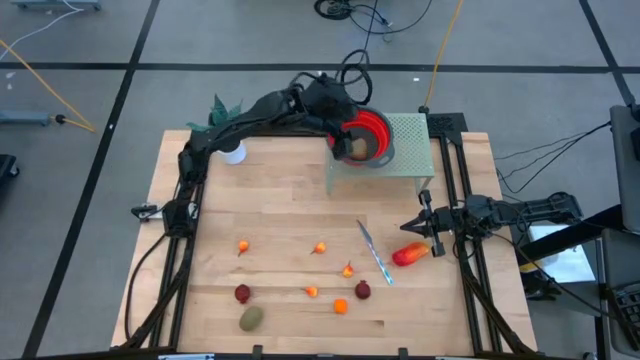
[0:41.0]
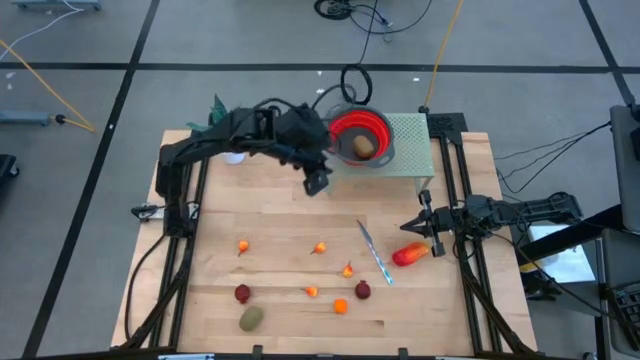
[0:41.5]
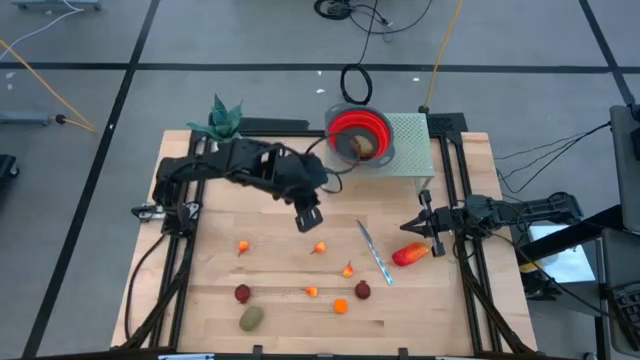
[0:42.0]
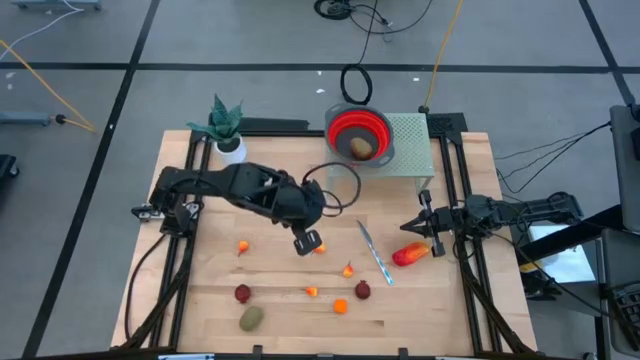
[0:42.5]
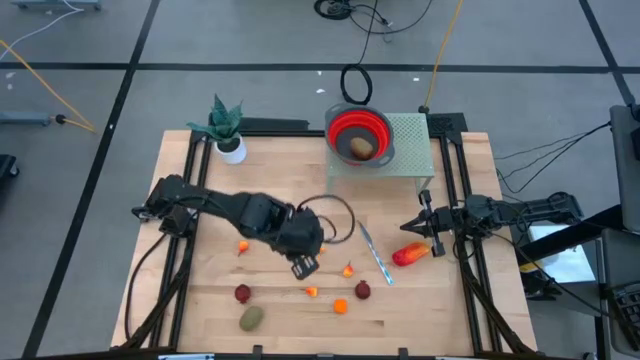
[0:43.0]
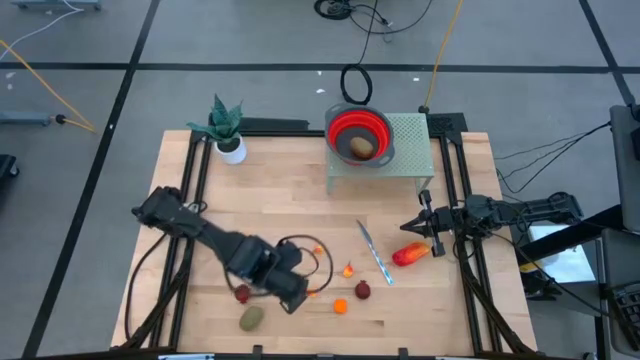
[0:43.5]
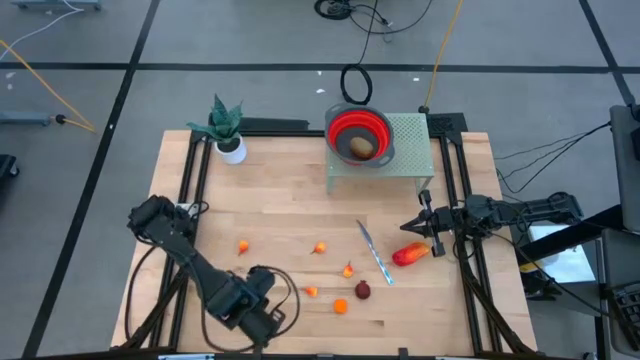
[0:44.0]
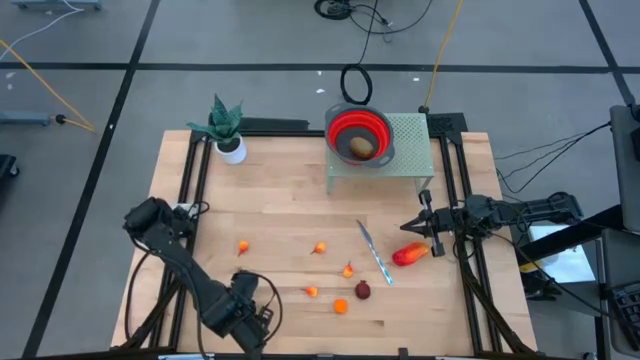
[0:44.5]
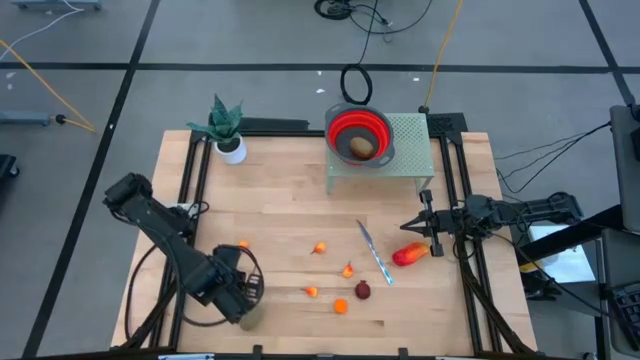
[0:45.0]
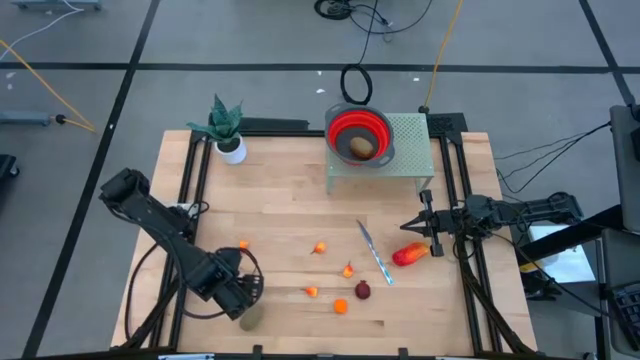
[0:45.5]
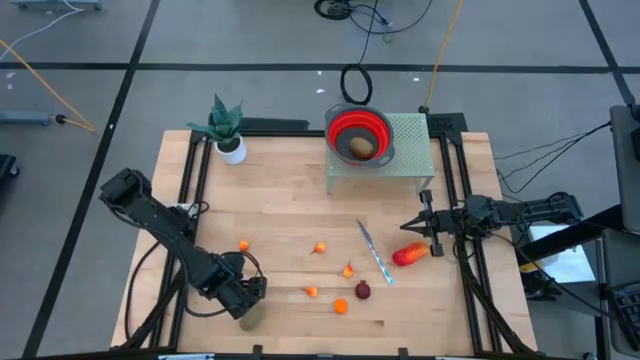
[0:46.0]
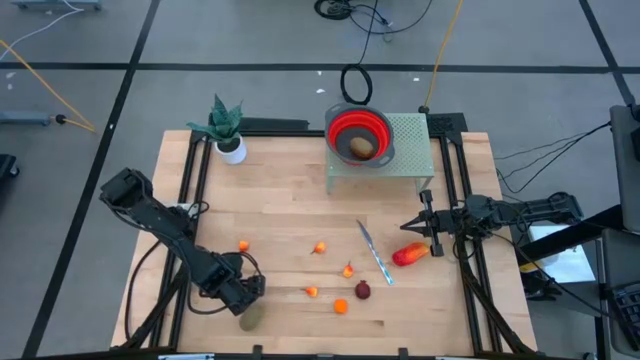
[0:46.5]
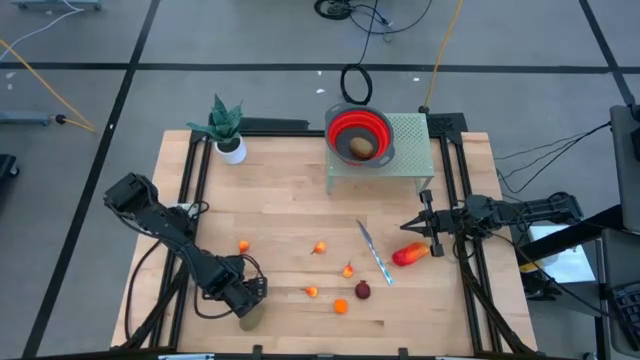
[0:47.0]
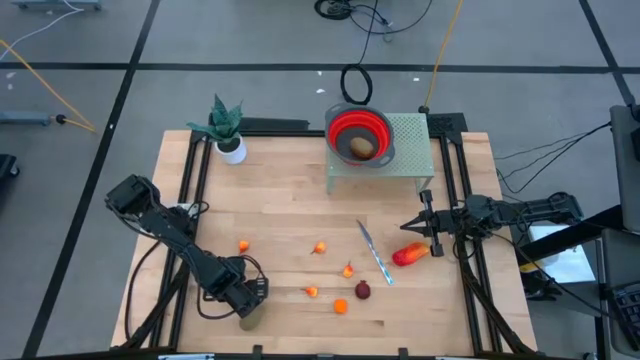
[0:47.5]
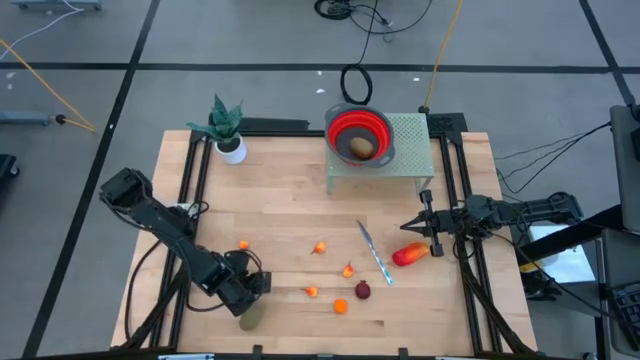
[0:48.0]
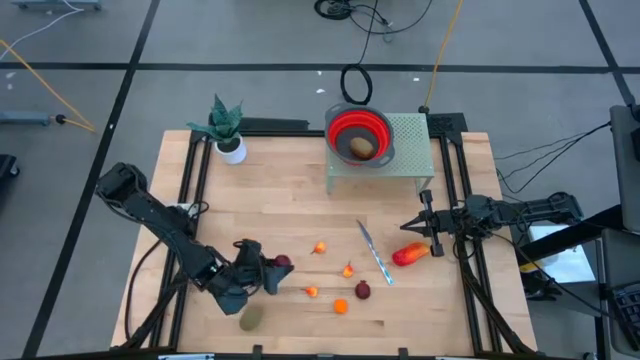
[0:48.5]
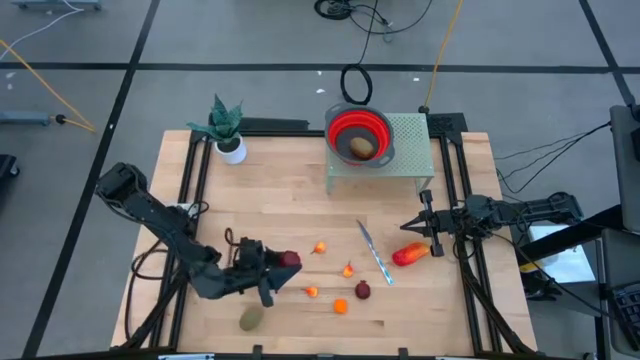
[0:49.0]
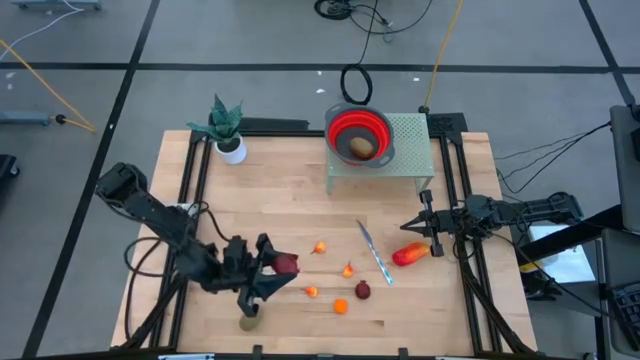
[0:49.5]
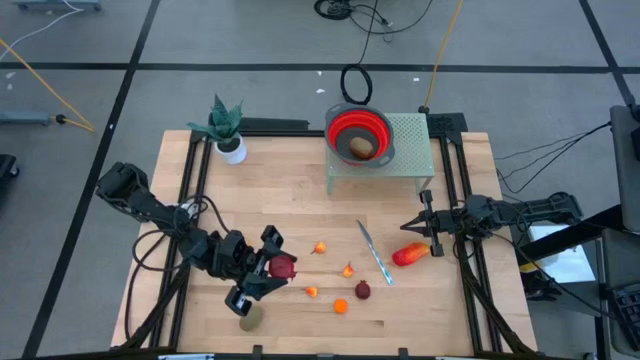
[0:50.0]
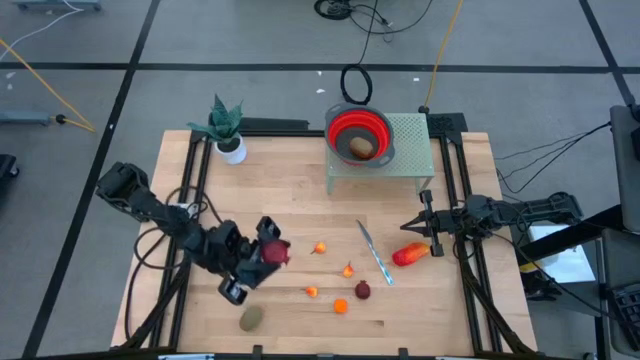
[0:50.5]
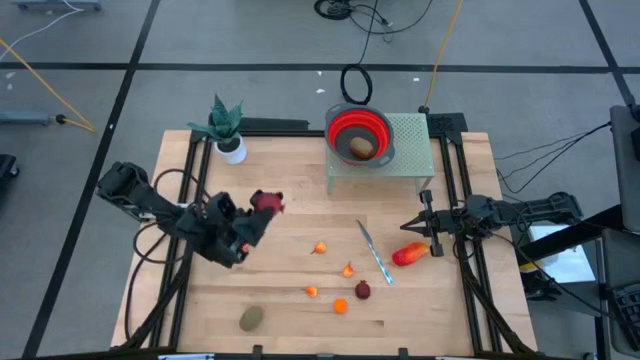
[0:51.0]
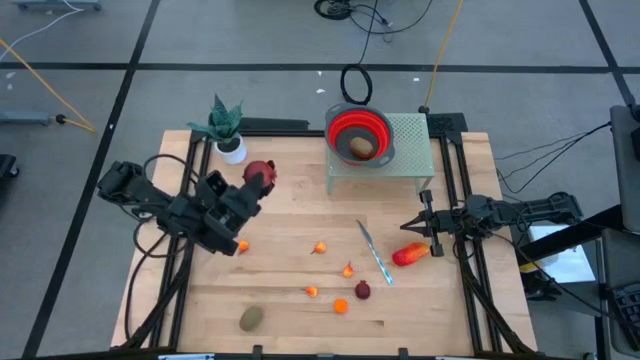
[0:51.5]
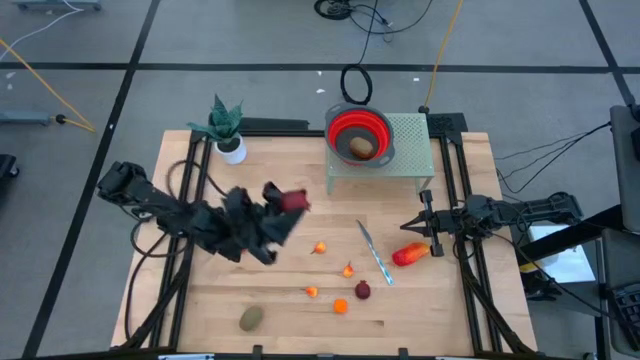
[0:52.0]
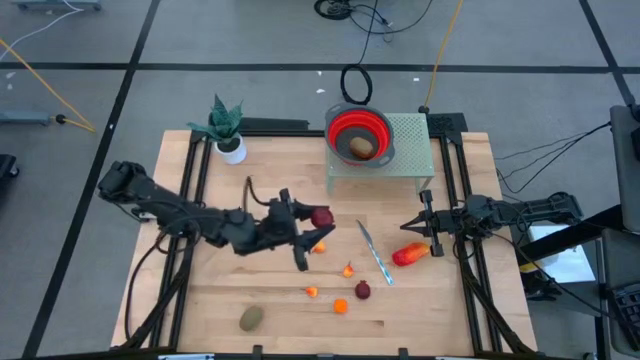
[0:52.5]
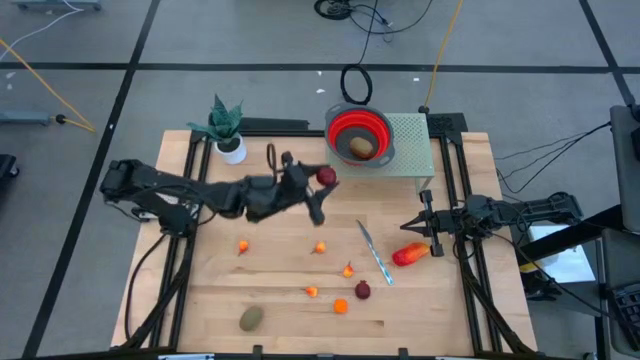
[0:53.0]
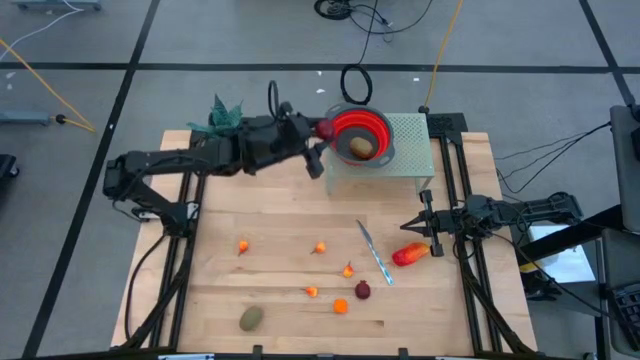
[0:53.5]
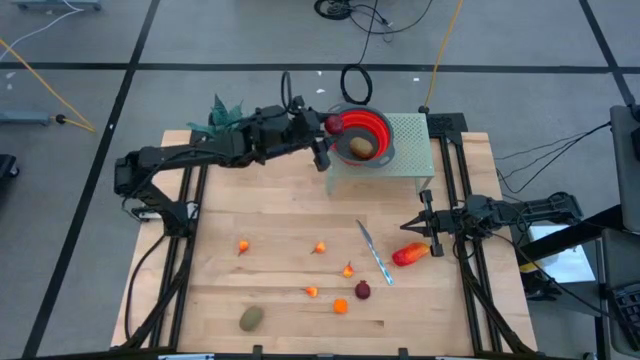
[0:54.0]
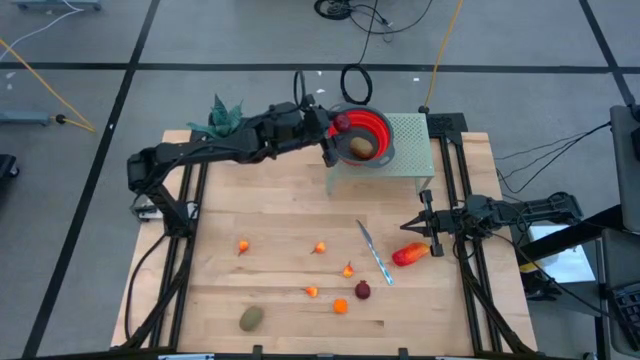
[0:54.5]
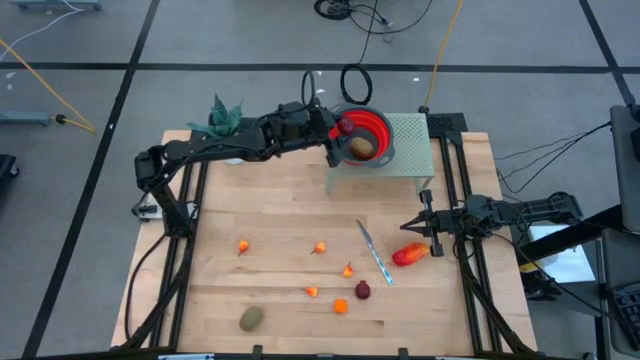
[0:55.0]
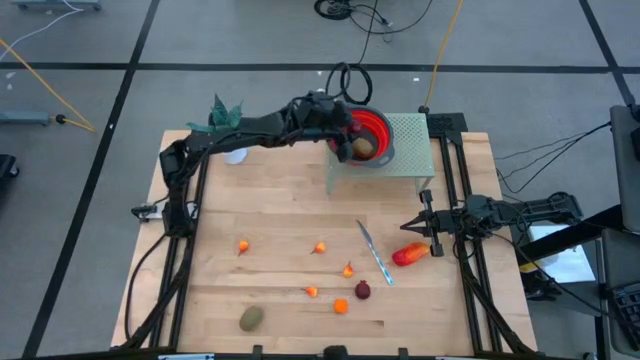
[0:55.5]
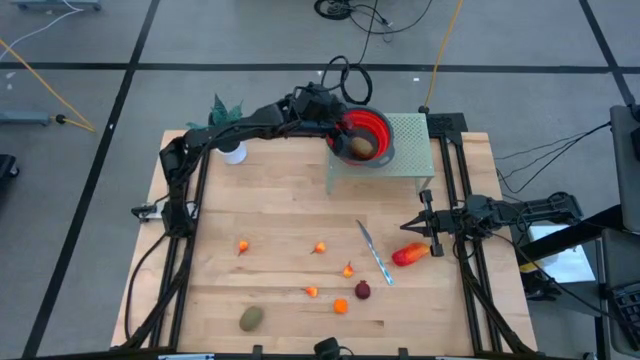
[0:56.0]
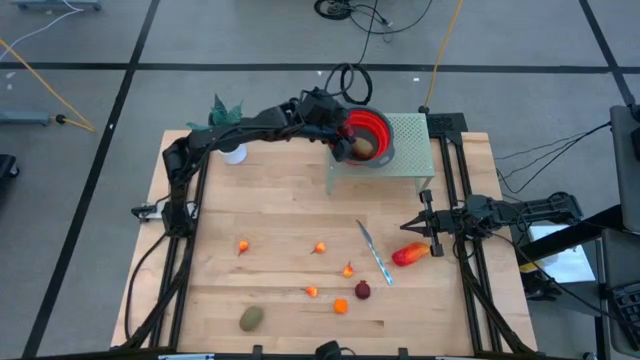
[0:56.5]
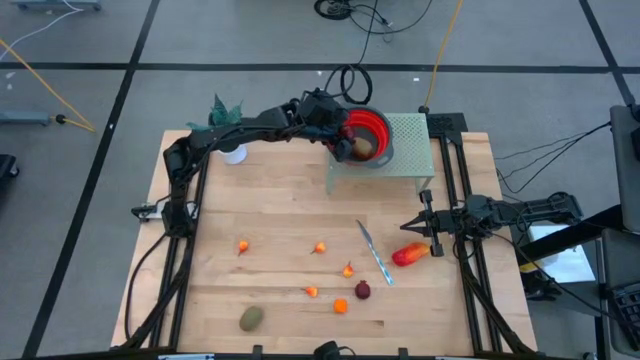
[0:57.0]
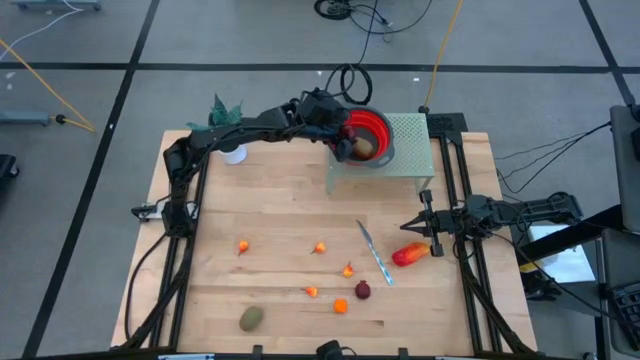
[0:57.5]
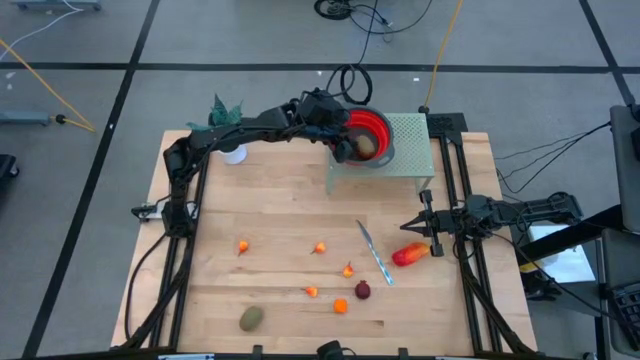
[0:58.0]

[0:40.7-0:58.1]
Task: Pick & Place Fruit
Put the red pomegranate into the red basket on the shelf

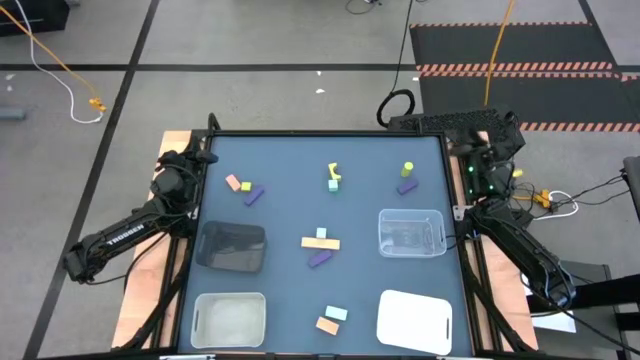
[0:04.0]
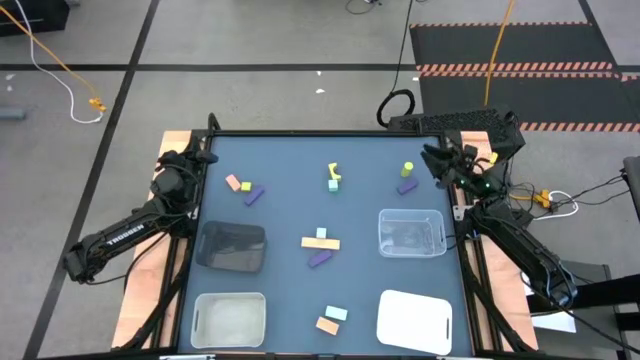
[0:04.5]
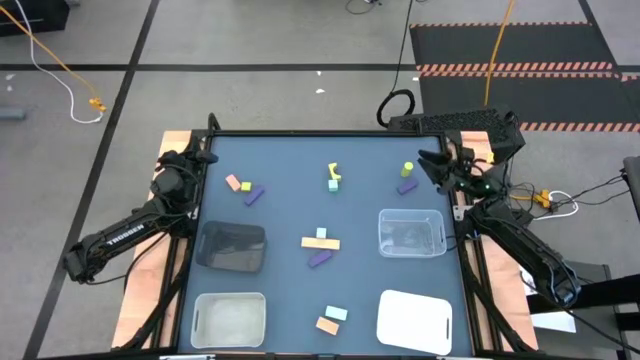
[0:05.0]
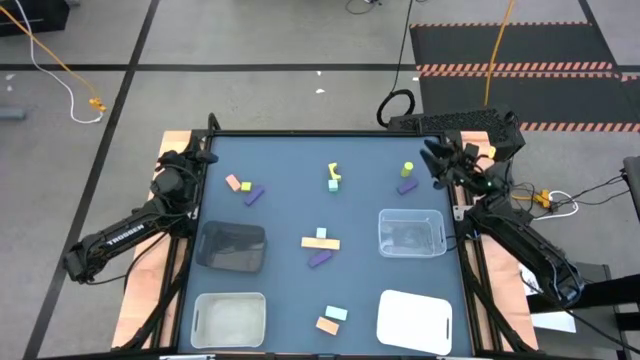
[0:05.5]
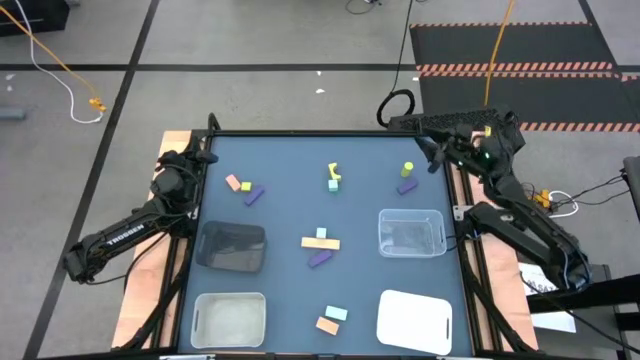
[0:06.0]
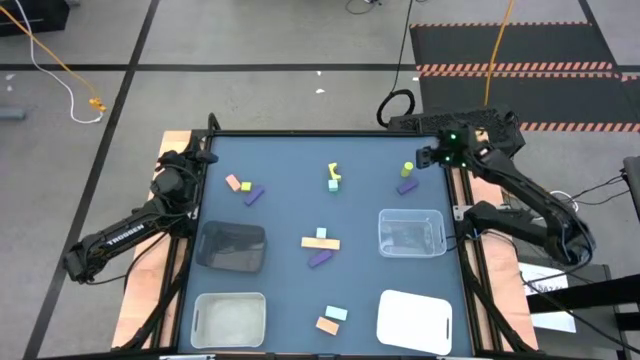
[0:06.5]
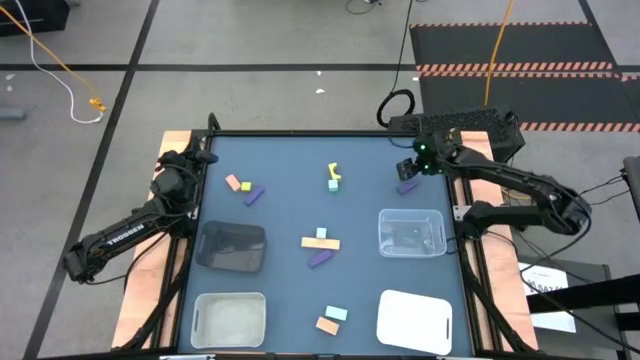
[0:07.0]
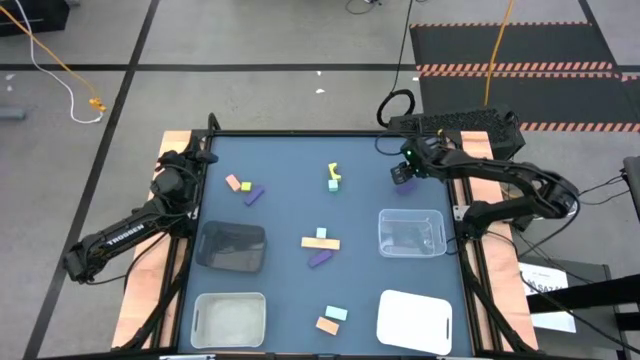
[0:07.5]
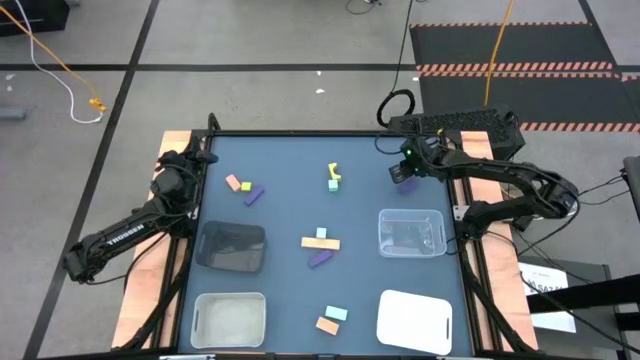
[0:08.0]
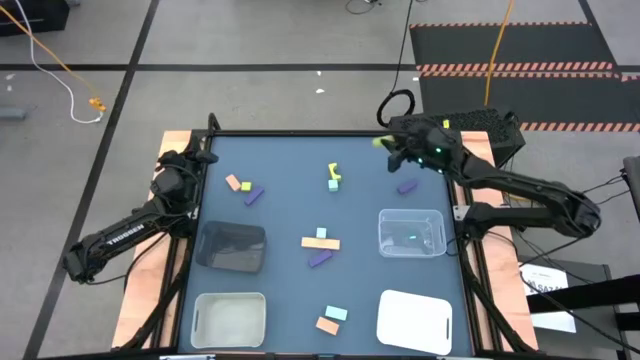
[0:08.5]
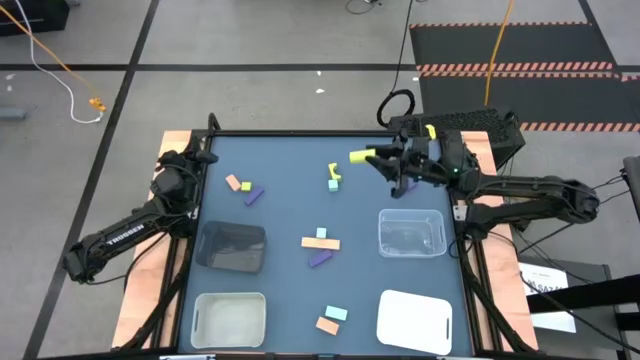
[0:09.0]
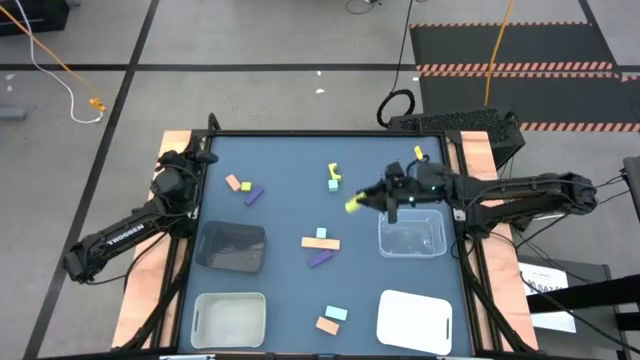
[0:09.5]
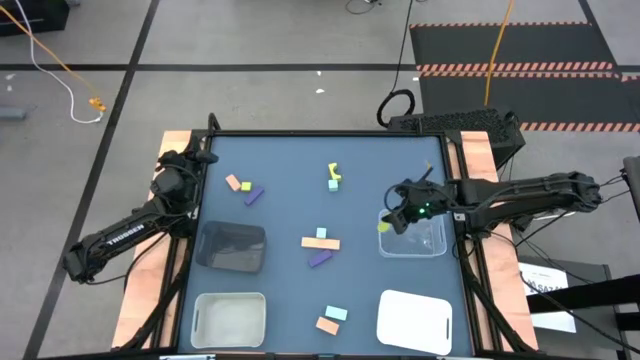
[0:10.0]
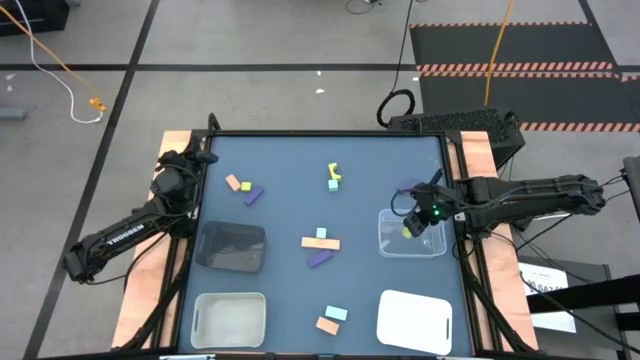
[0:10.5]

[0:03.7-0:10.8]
Task: Sort & place blocks by color
Put the right green block into the transparent bin
